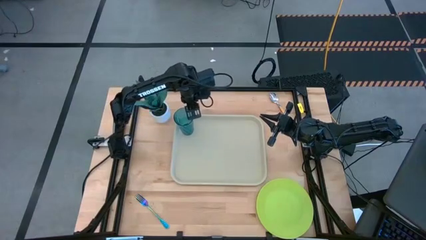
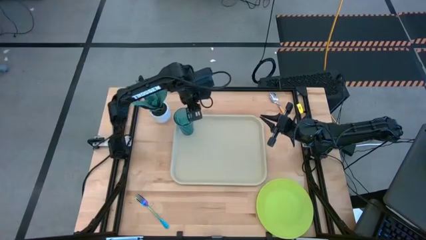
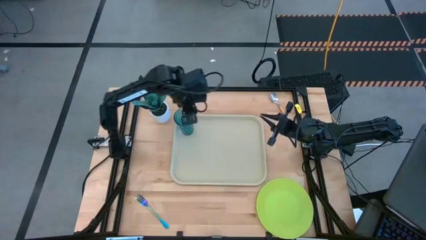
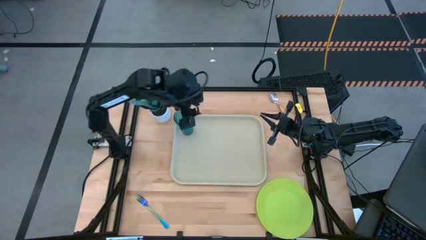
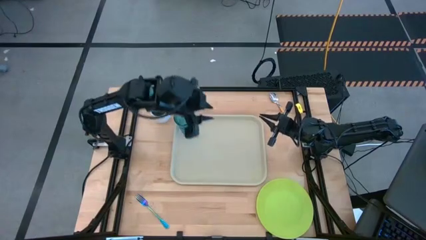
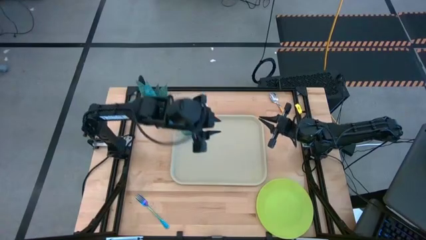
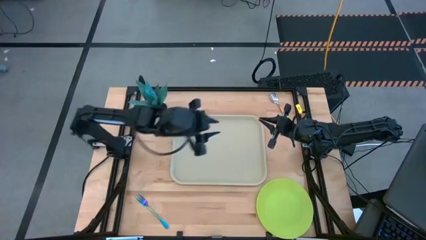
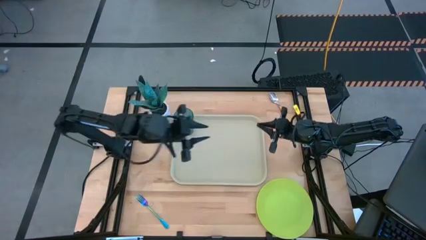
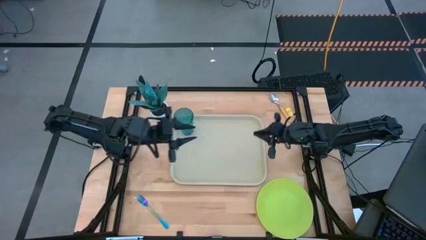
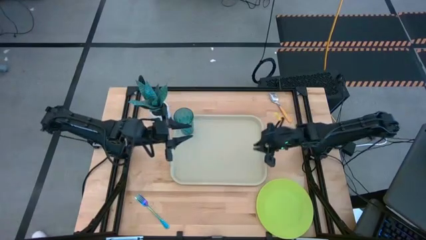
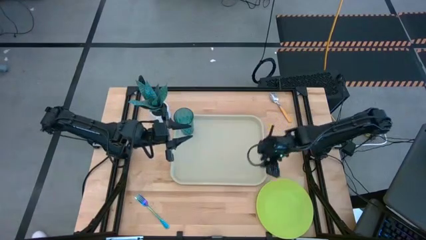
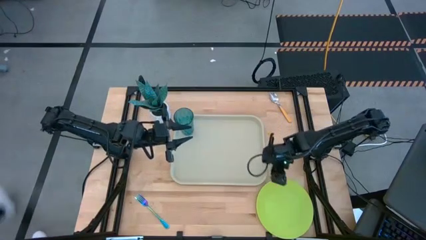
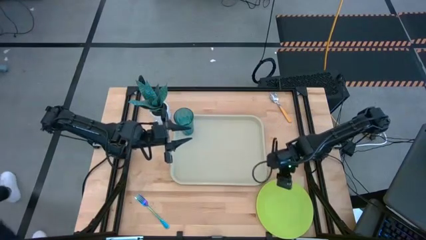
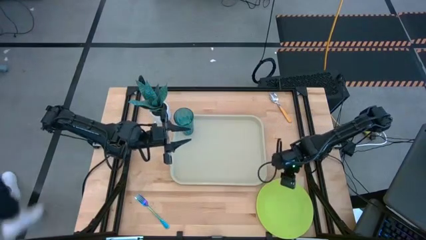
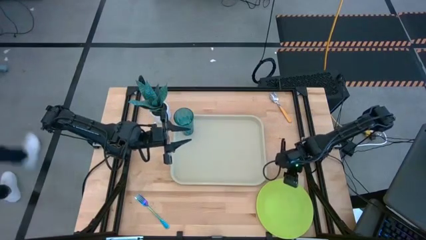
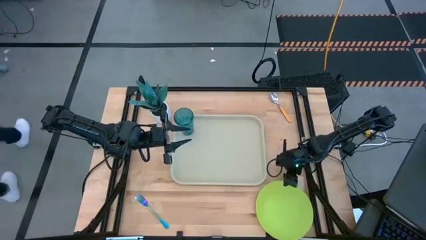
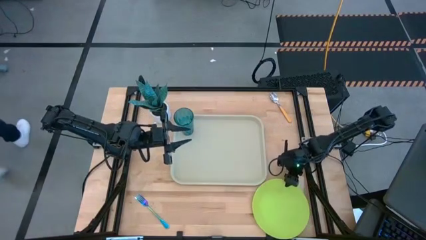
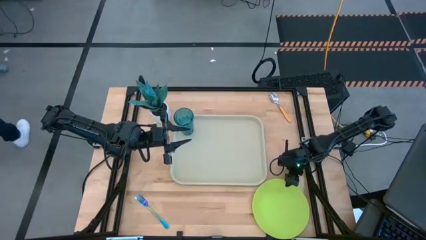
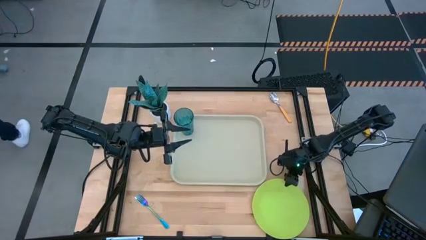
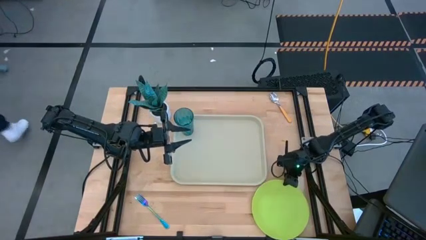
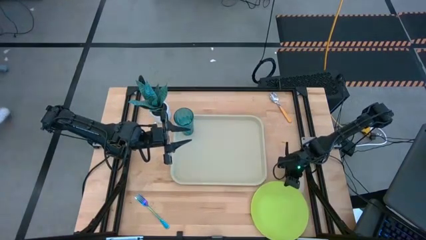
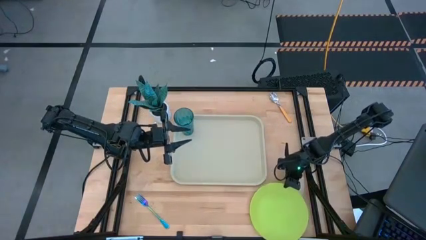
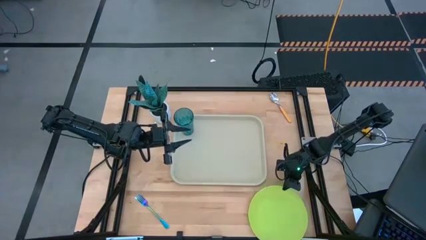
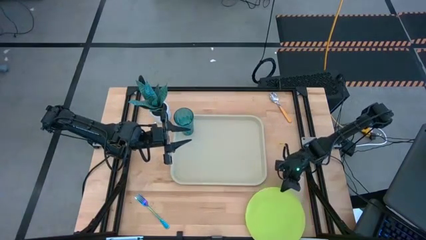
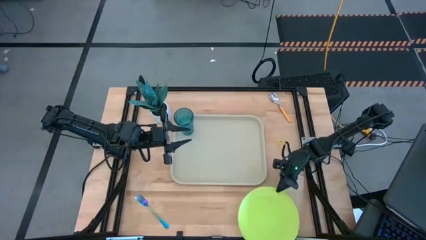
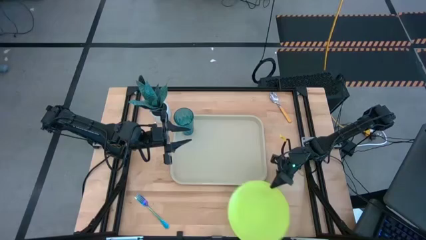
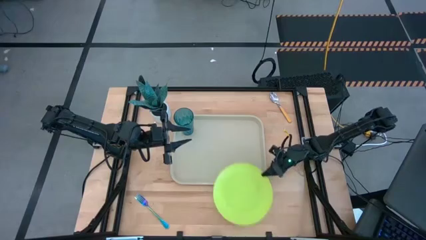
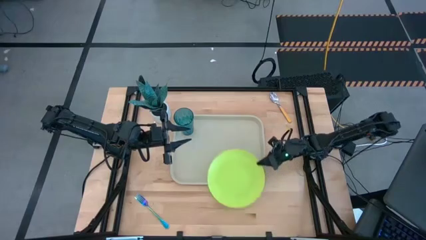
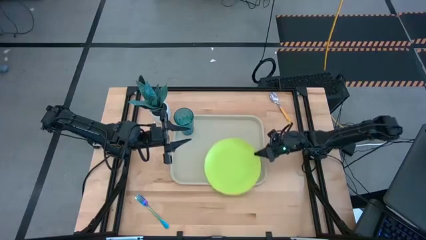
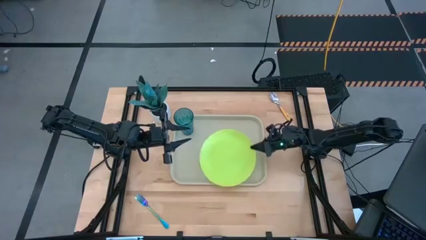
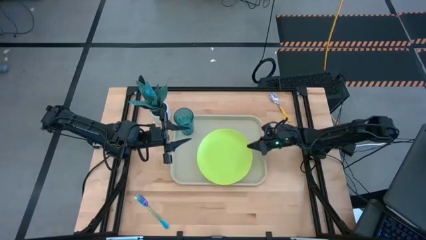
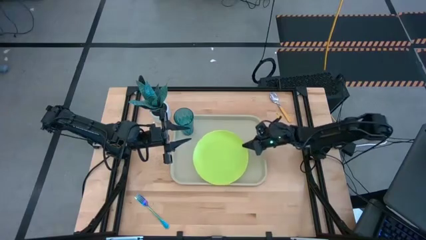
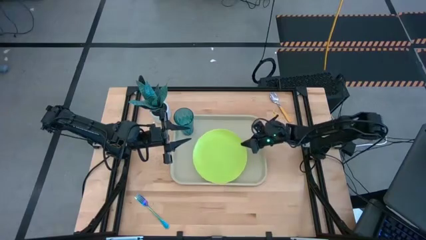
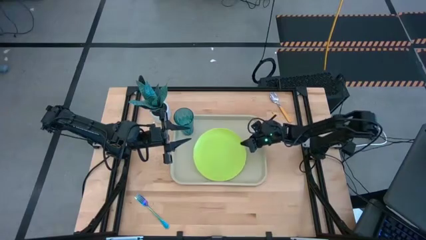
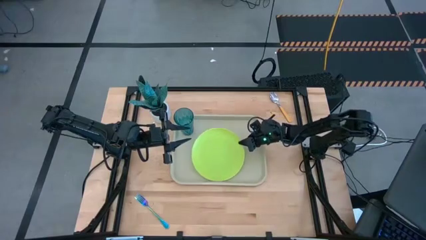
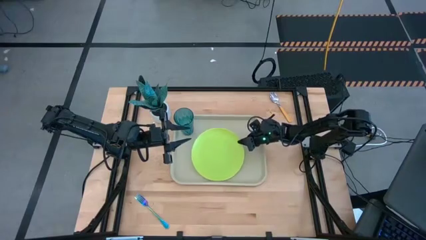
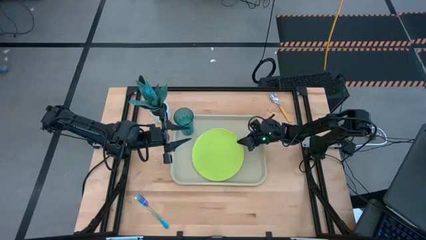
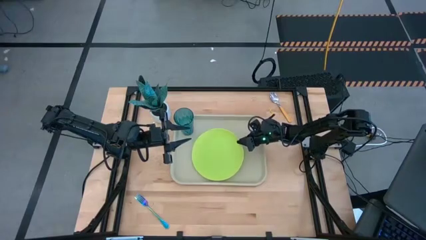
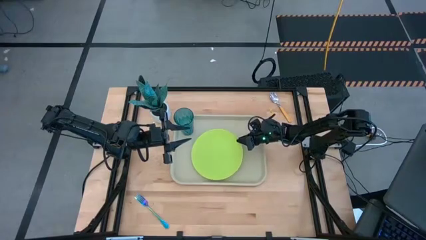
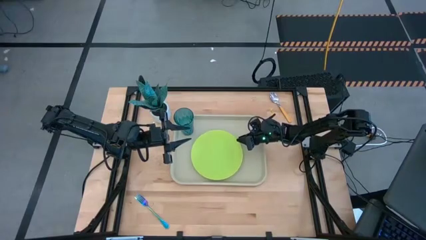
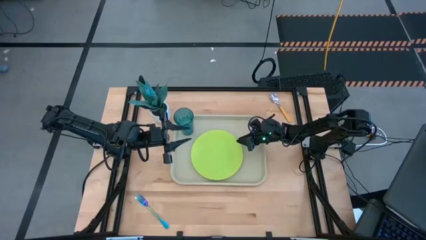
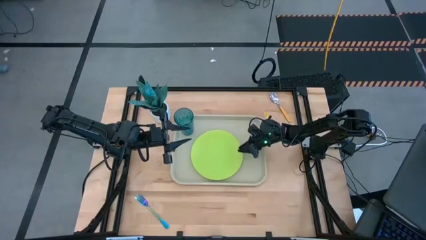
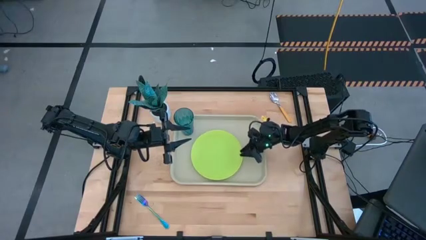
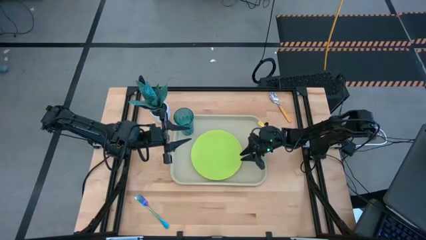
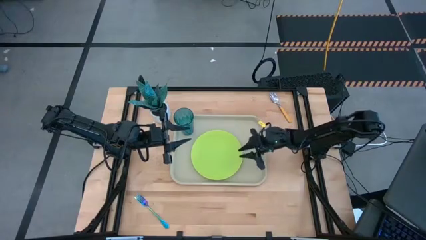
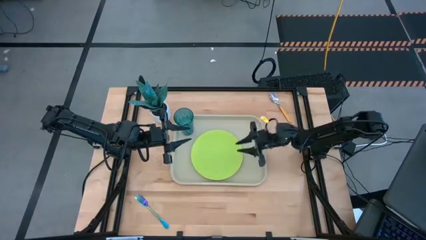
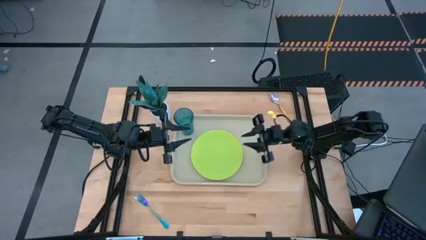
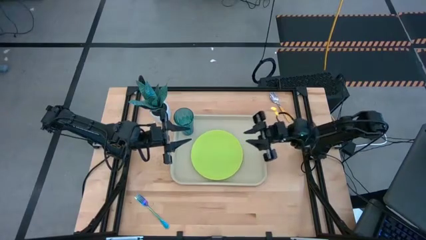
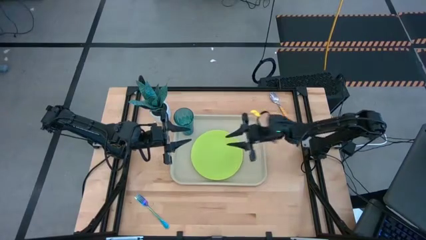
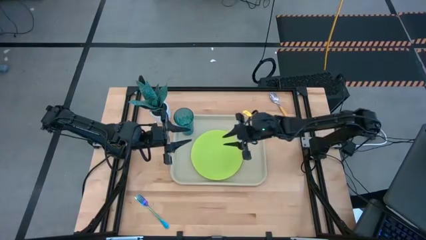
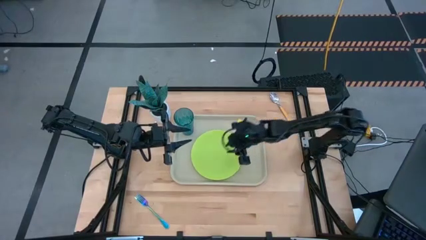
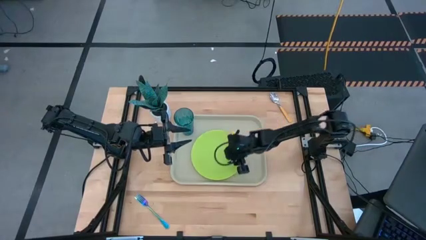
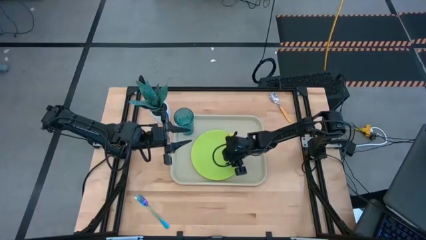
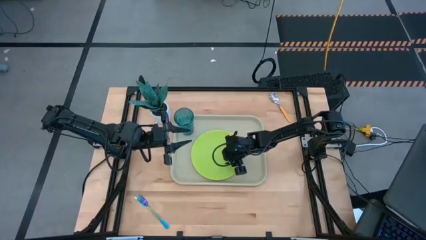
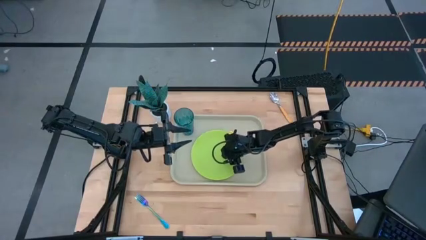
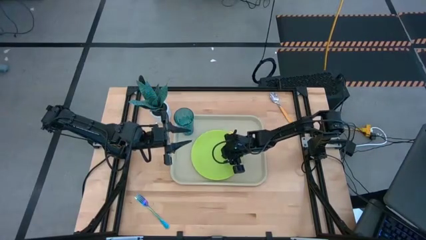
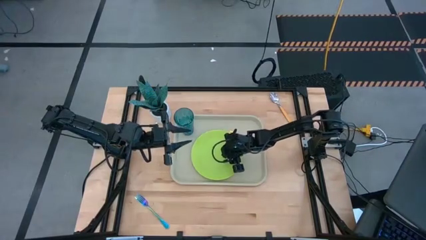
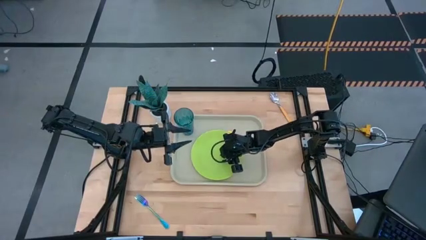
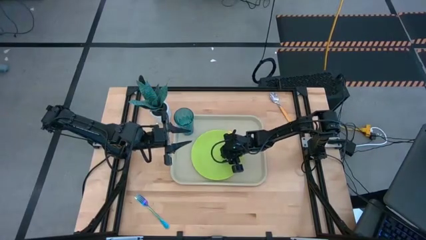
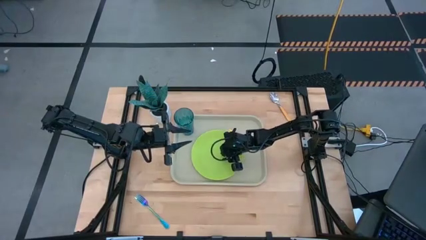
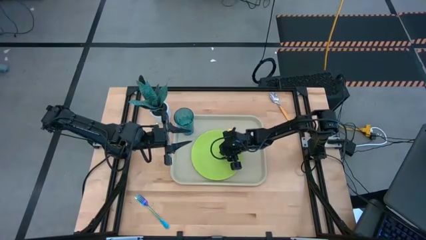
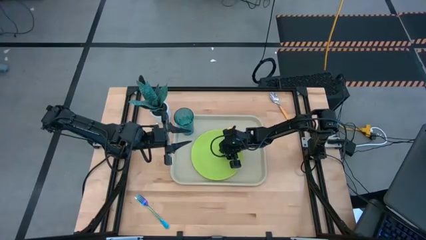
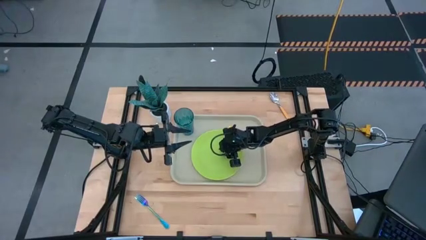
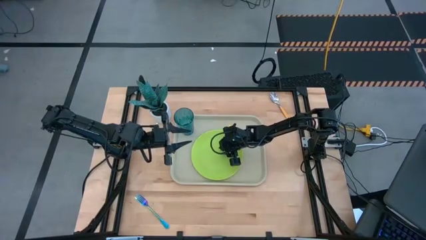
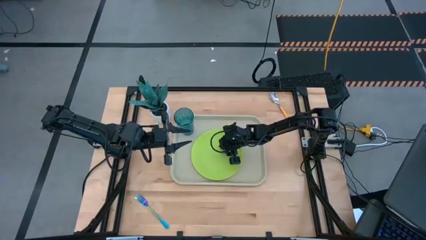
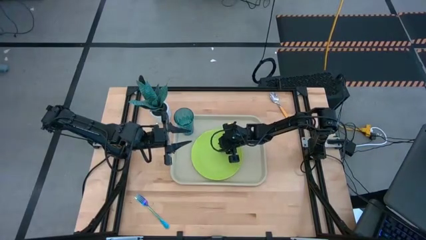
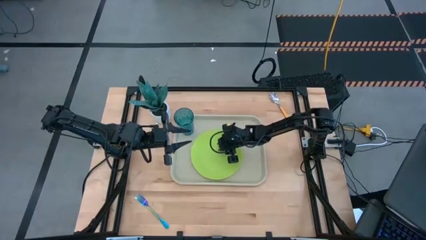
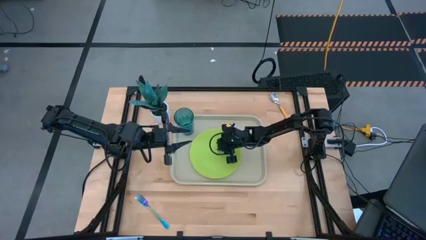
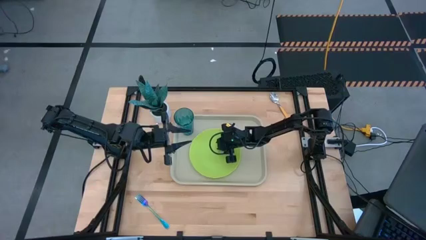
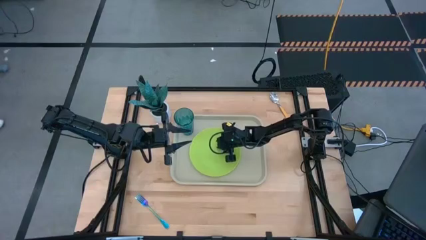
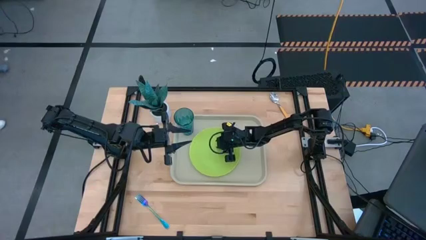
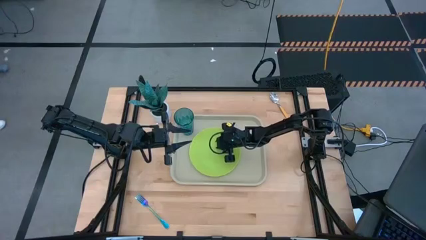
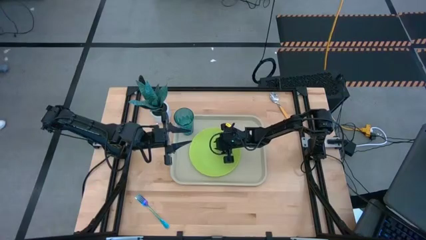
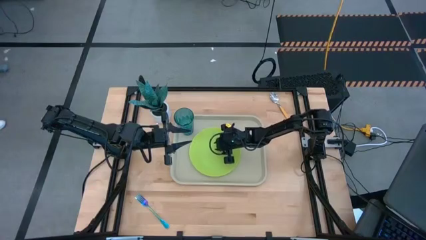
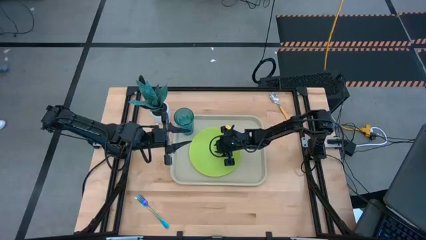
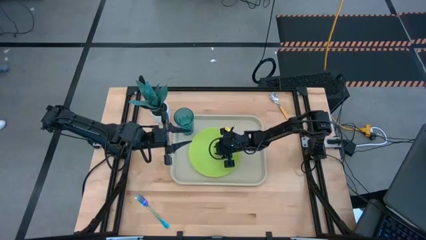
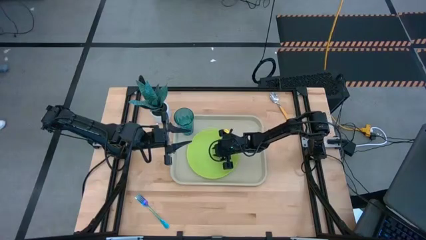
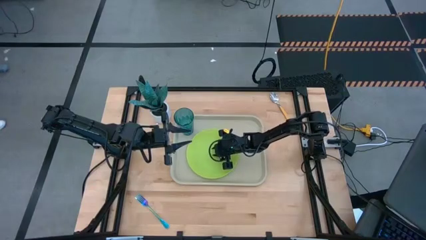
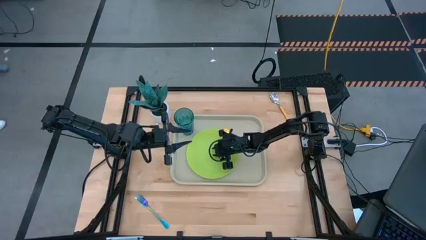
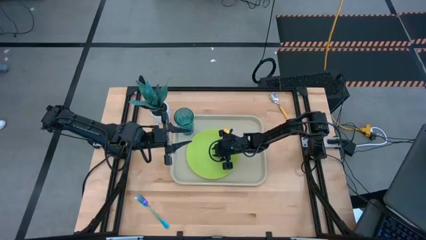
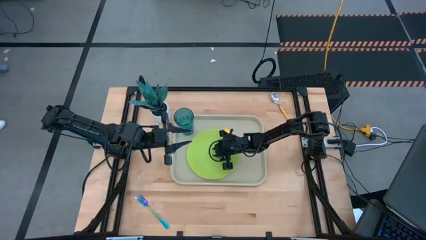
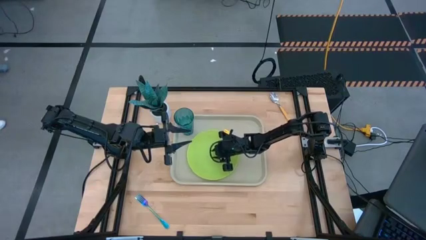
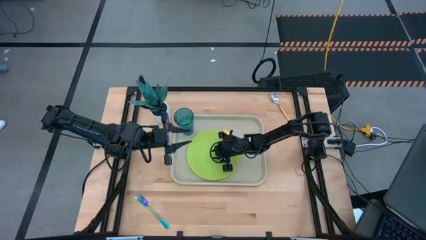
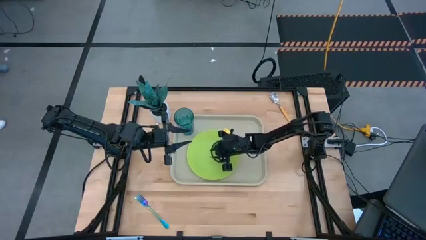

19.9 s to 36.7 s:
Task: Pick and place plate/cup/fork/spoon on tray
Put the green plate to the middle left of the white food tray
